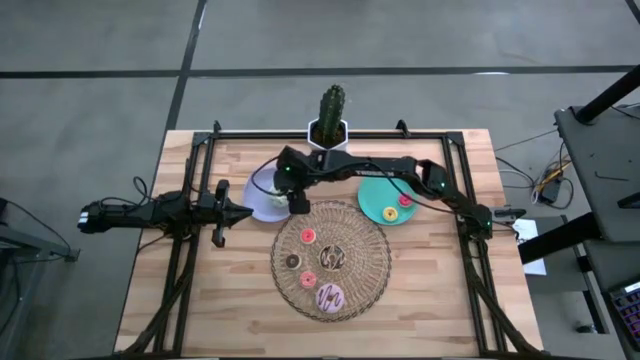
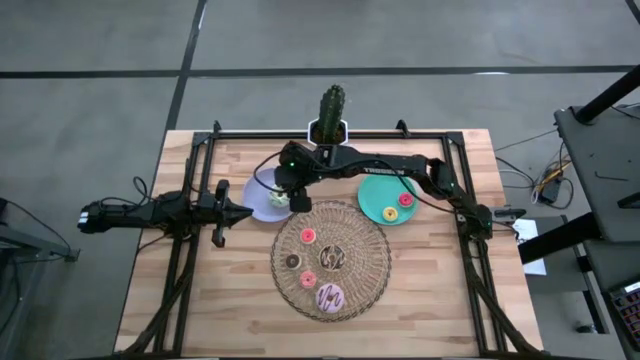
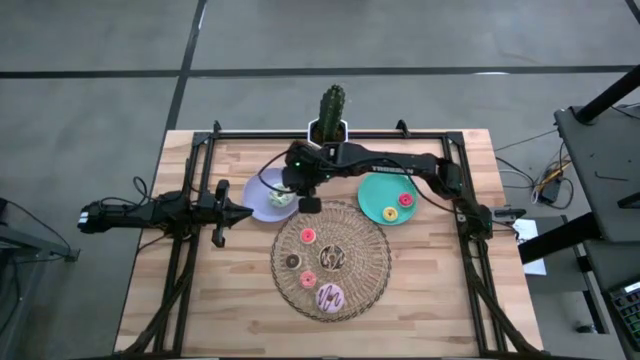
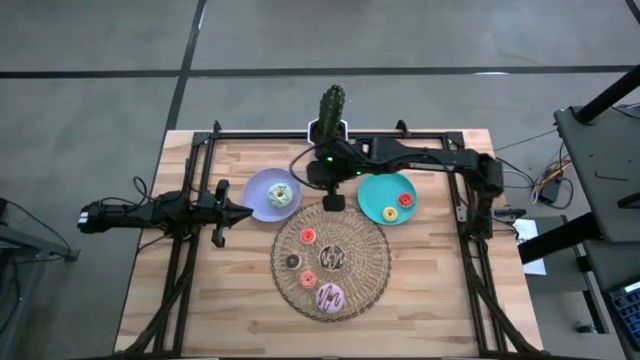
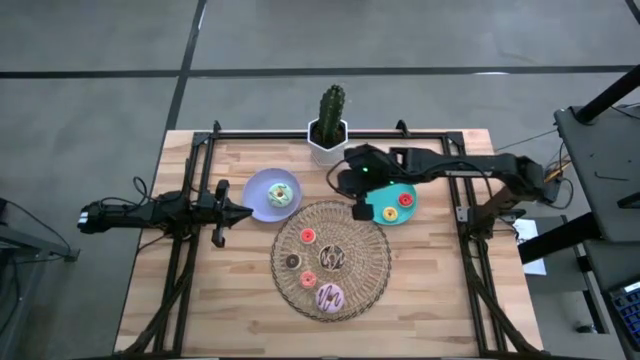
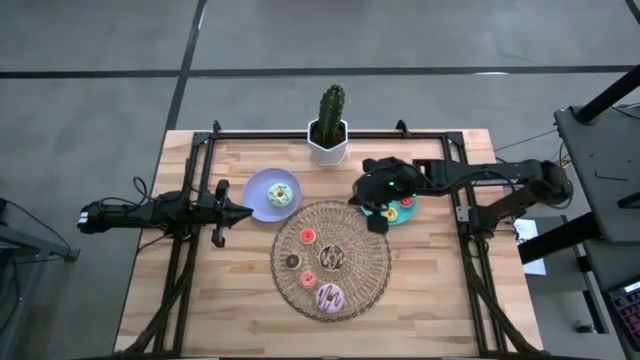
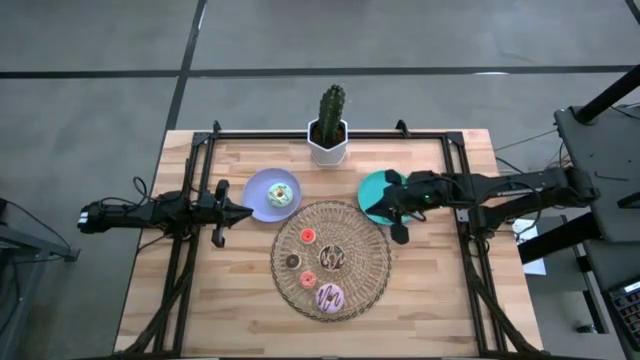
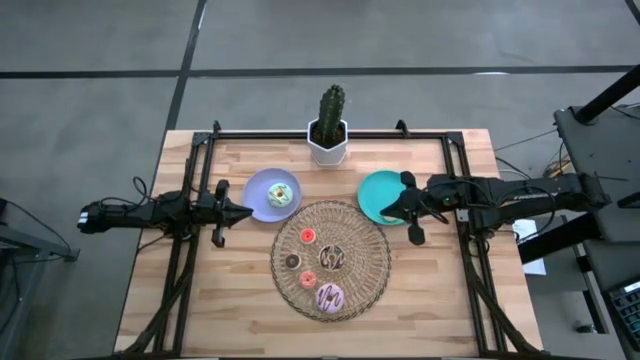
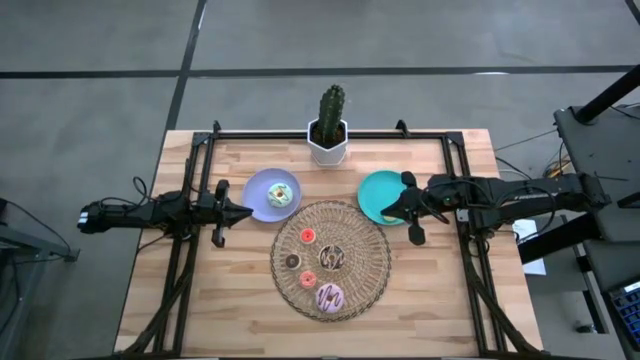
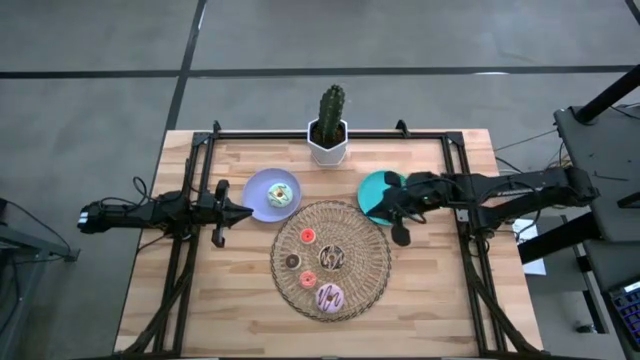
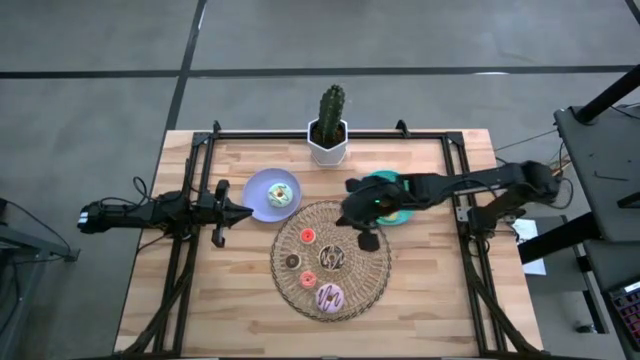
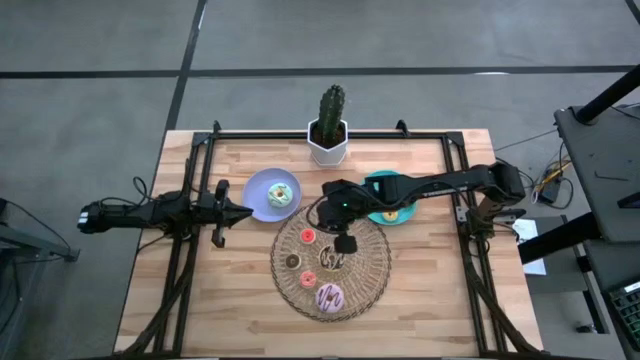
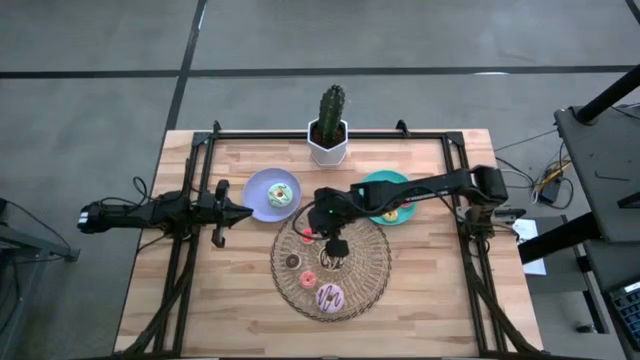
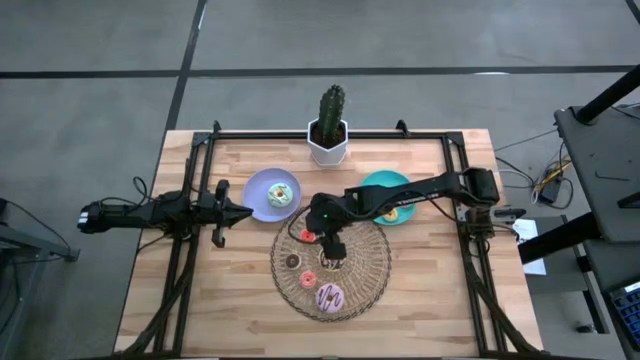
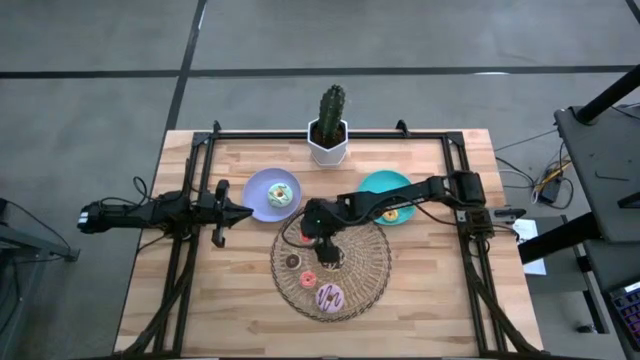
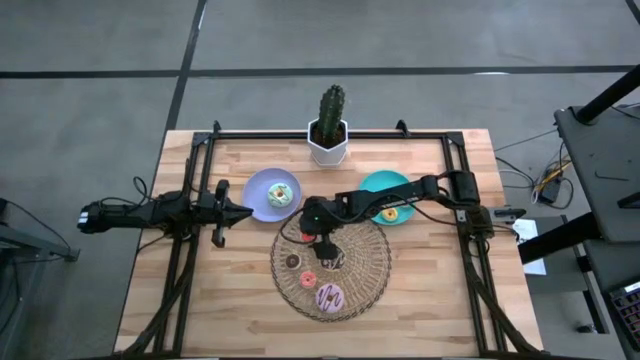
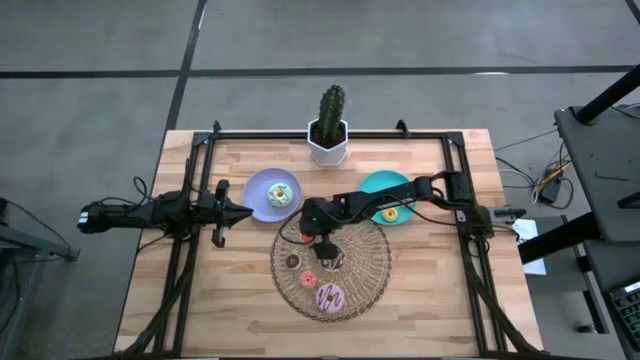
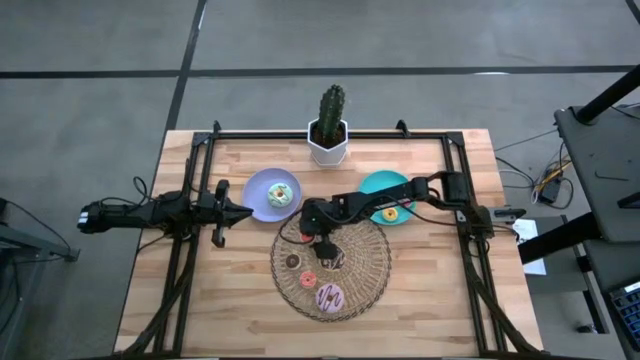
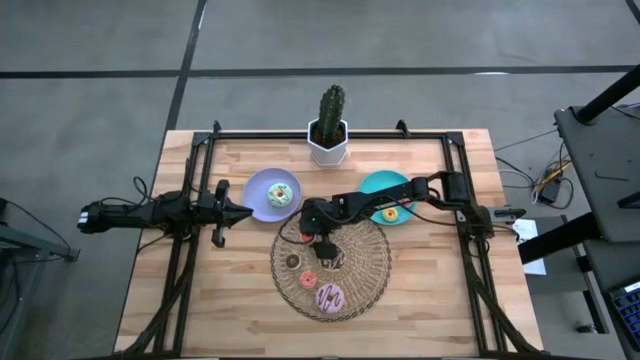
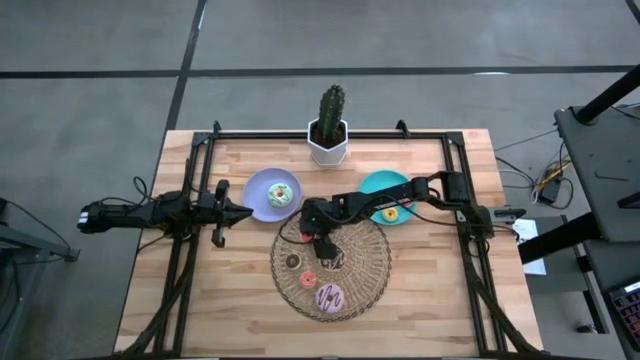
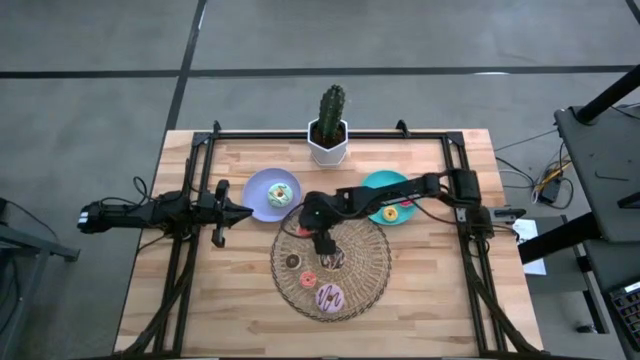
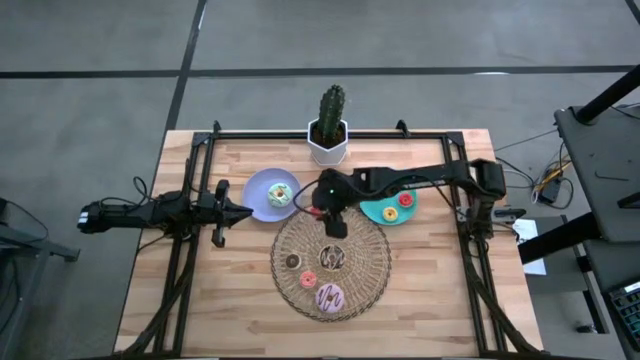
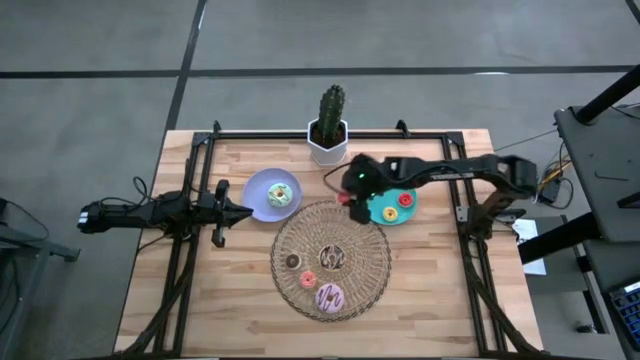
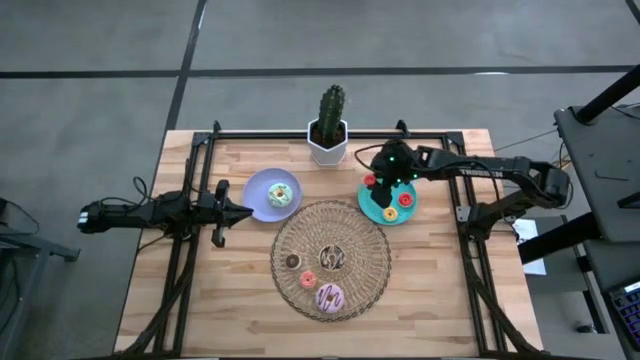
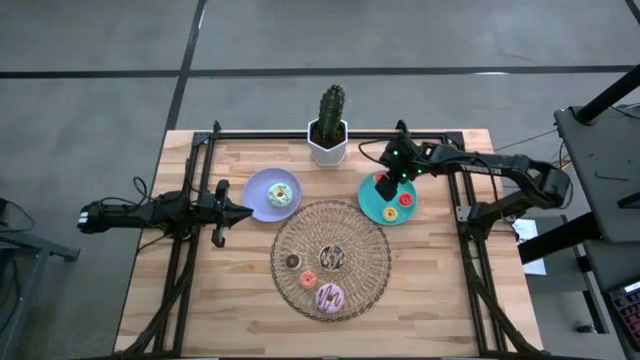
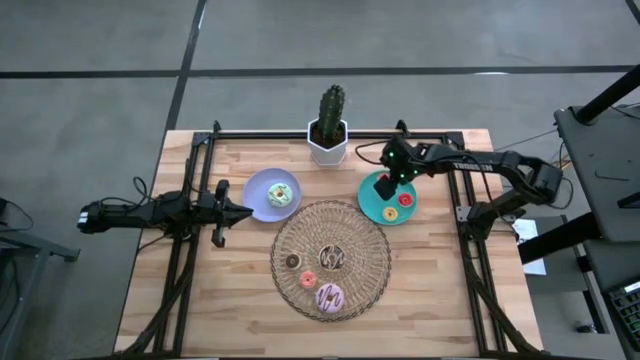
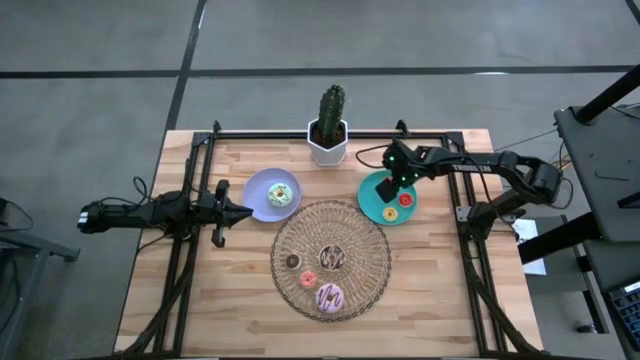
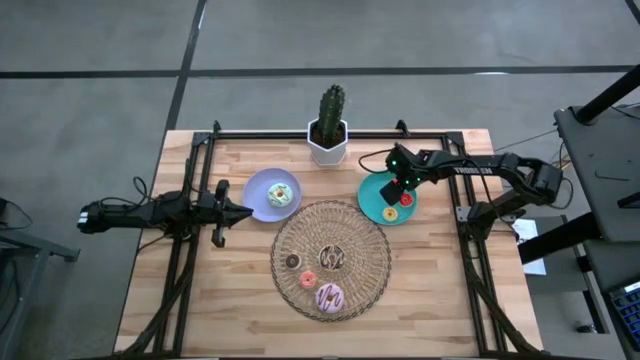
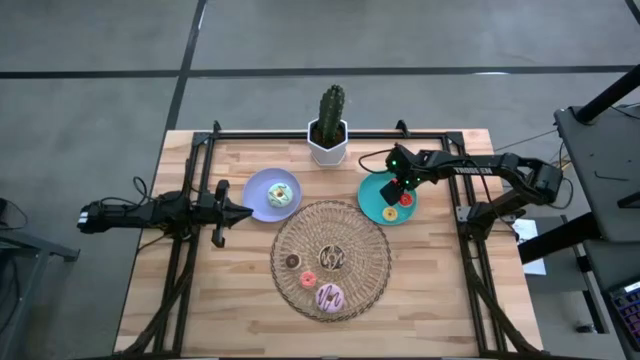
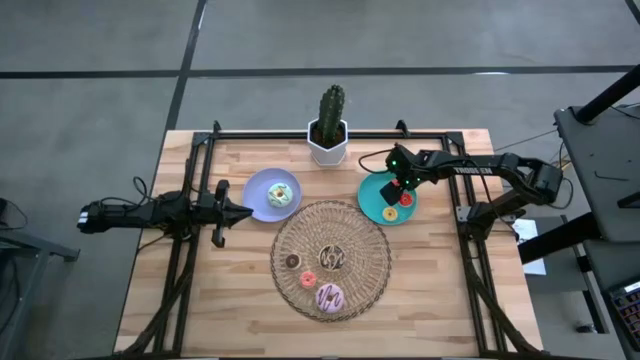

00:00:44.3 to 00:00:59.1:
Task: Pick & Place donuts
Put the small orange donut on the blue plate
